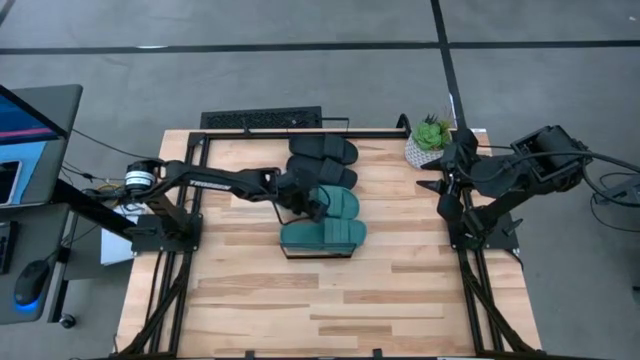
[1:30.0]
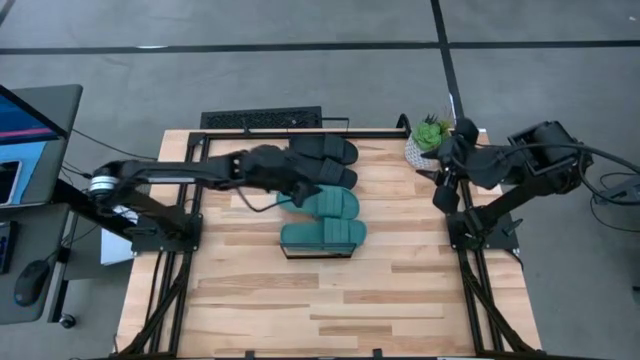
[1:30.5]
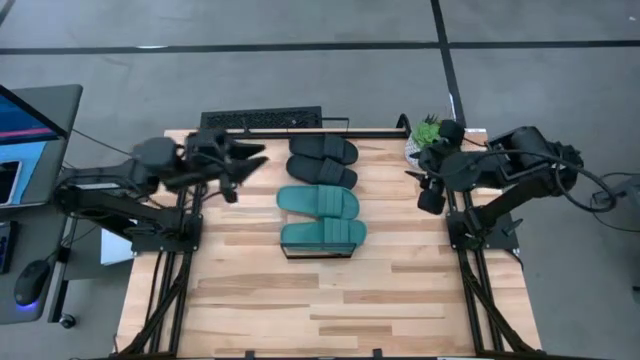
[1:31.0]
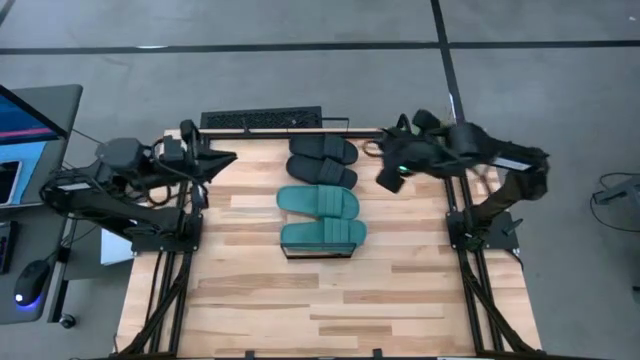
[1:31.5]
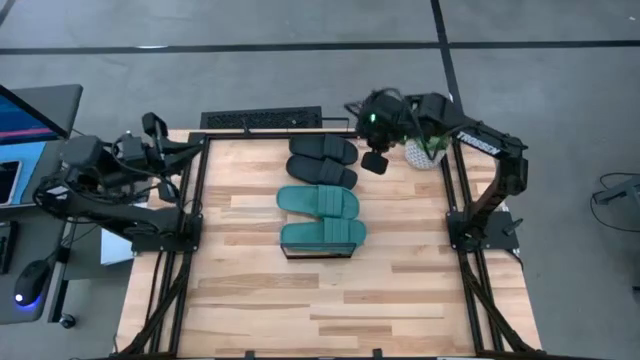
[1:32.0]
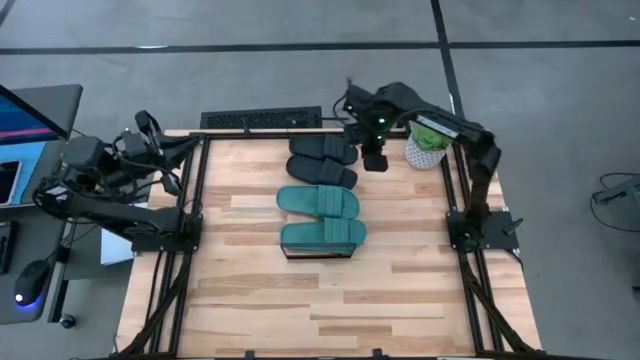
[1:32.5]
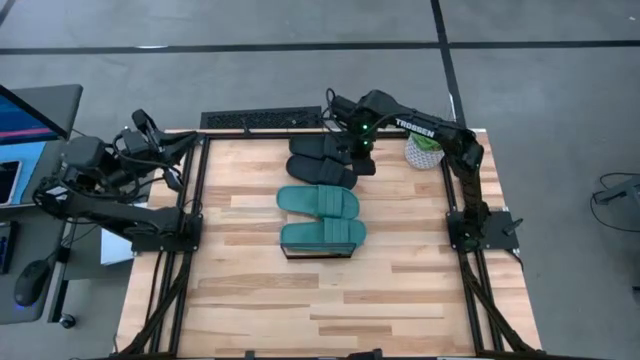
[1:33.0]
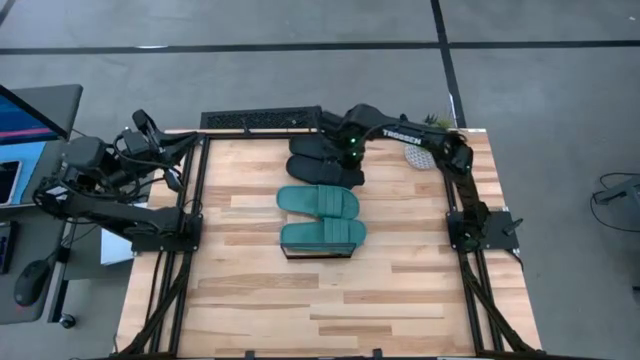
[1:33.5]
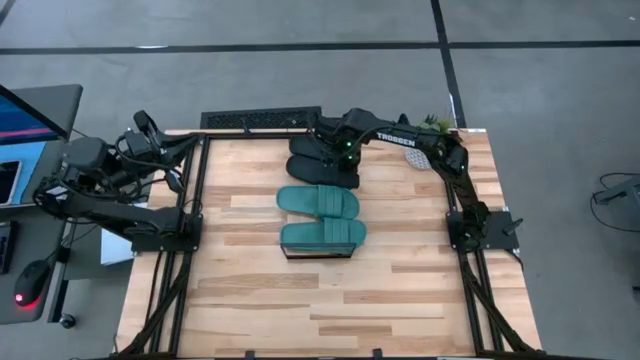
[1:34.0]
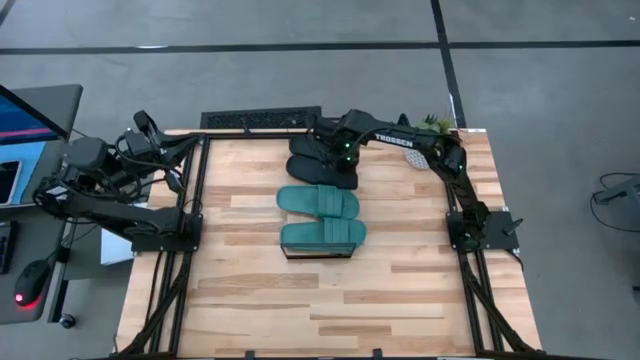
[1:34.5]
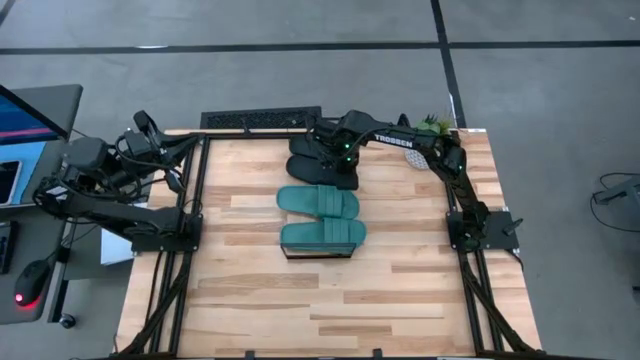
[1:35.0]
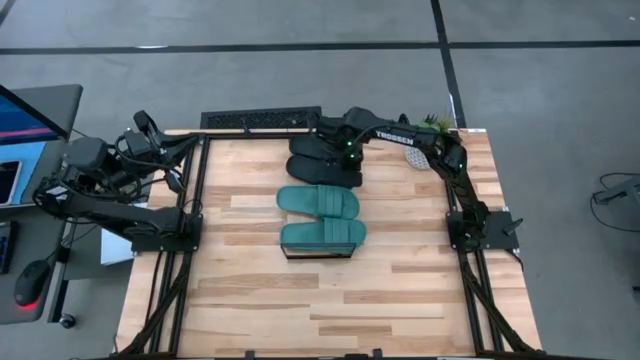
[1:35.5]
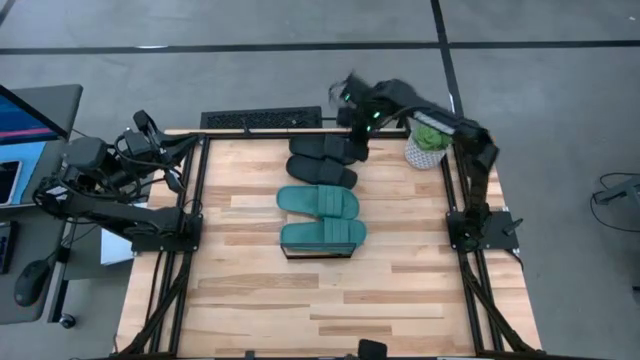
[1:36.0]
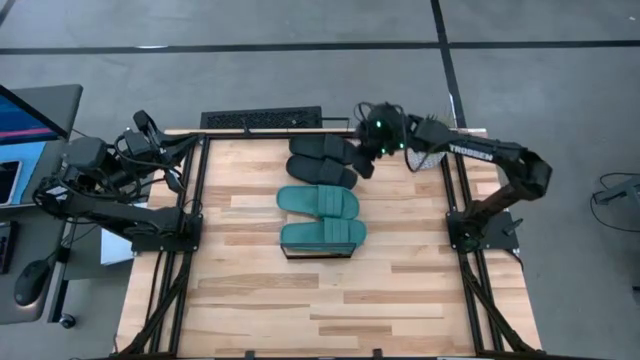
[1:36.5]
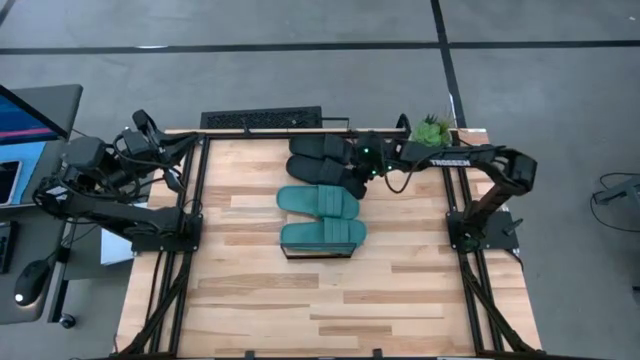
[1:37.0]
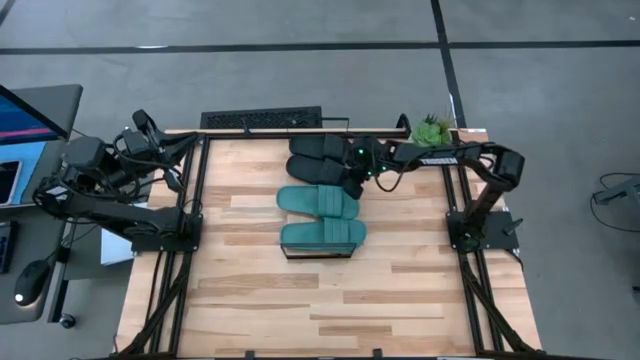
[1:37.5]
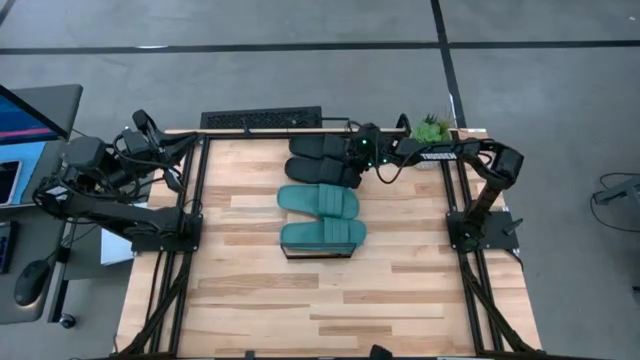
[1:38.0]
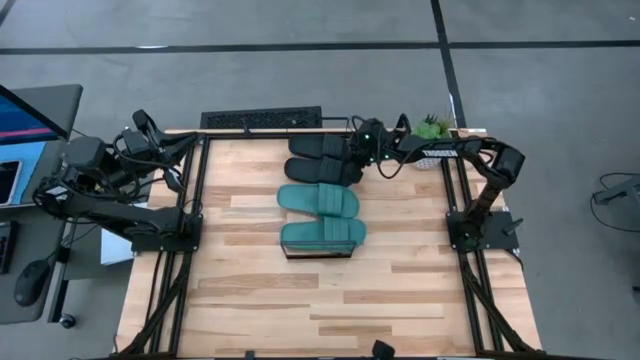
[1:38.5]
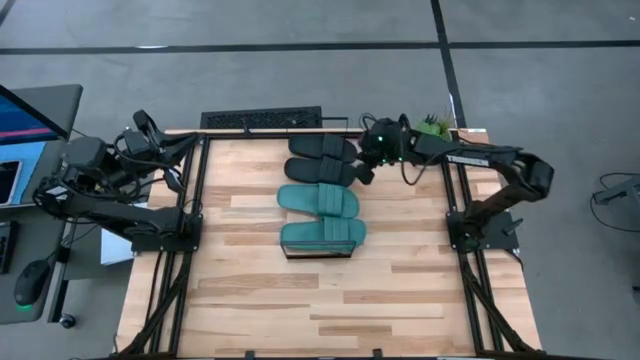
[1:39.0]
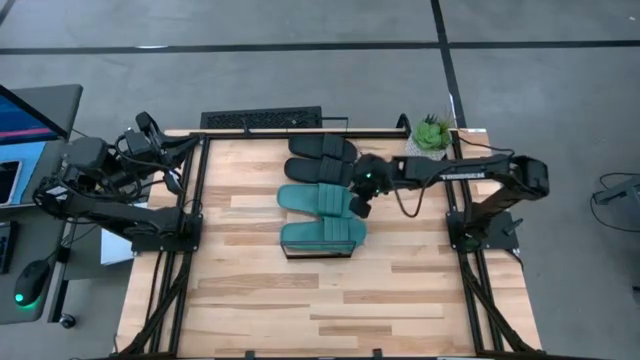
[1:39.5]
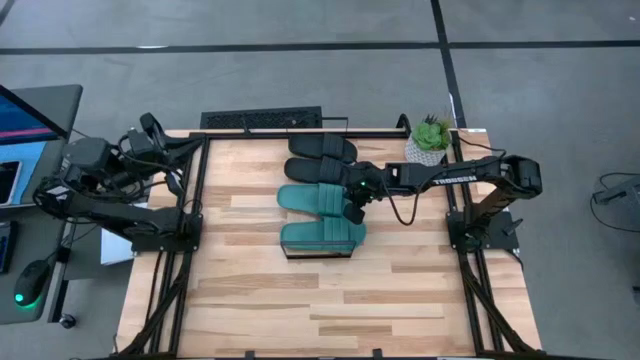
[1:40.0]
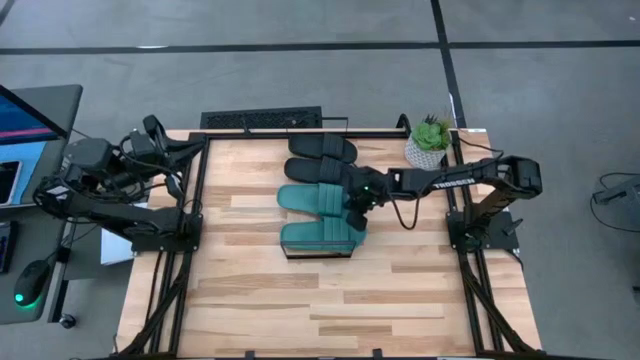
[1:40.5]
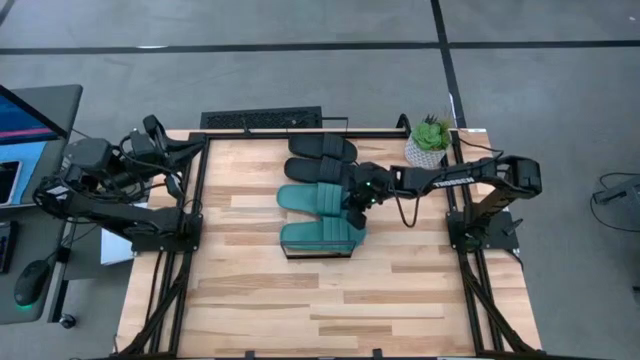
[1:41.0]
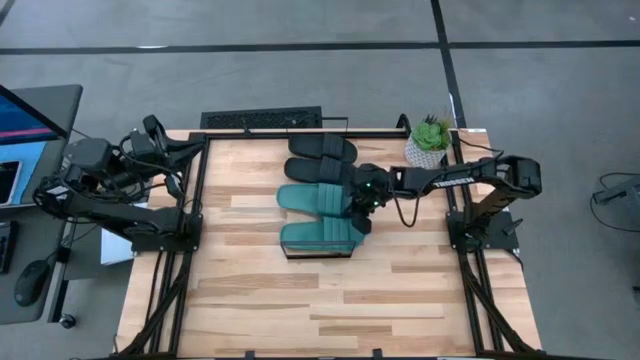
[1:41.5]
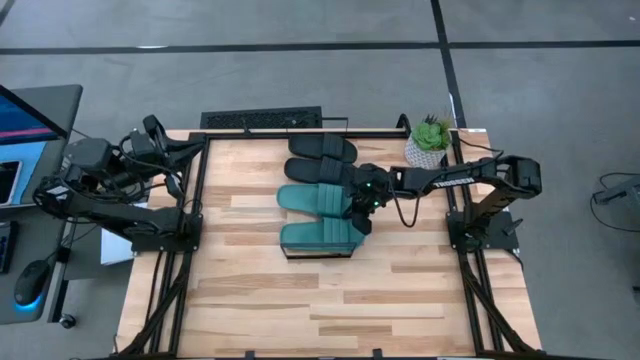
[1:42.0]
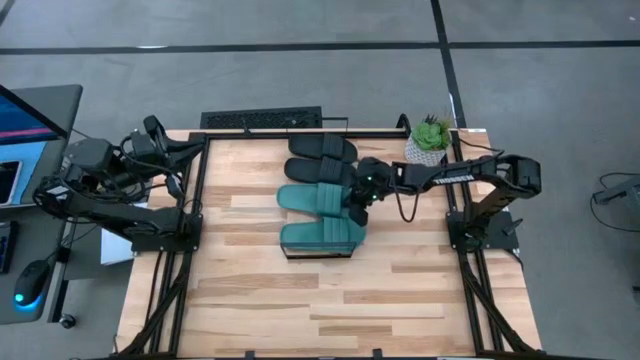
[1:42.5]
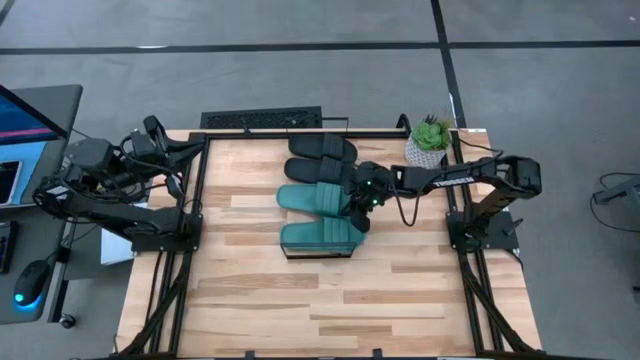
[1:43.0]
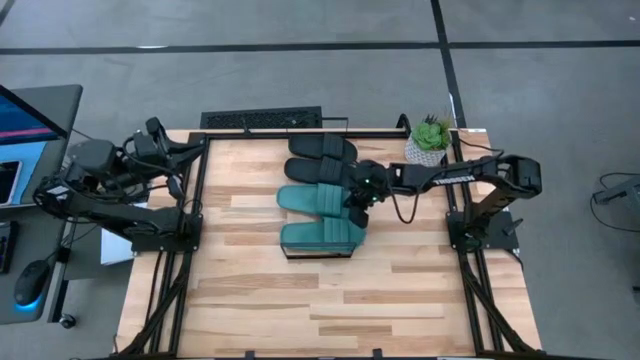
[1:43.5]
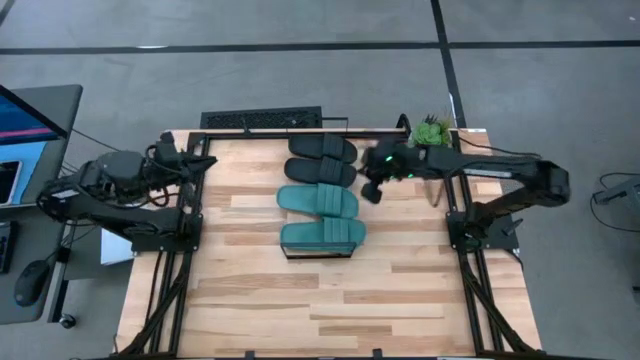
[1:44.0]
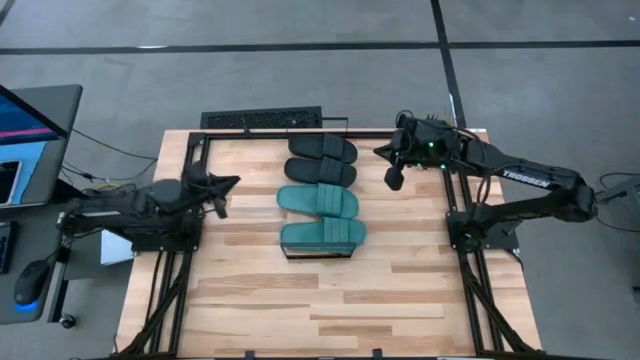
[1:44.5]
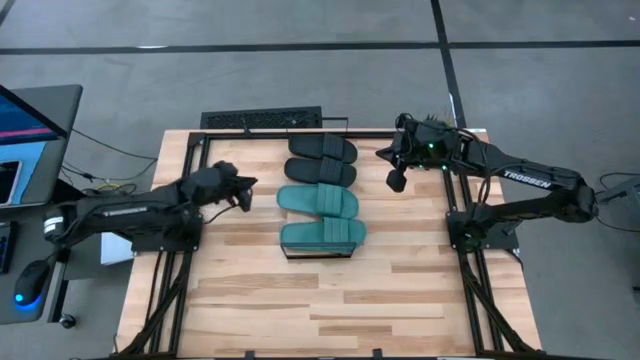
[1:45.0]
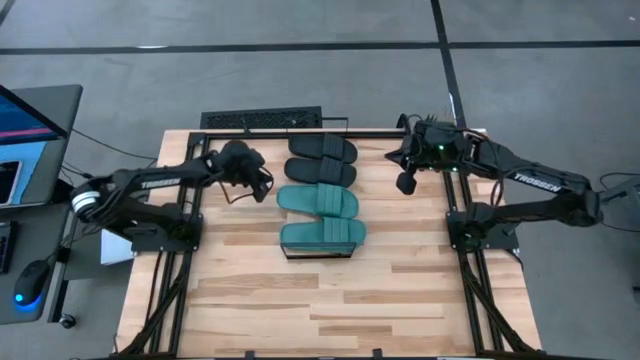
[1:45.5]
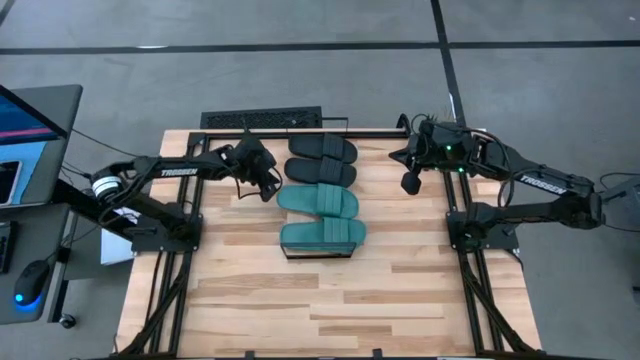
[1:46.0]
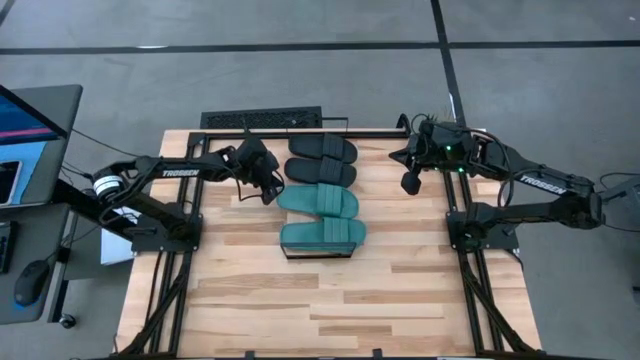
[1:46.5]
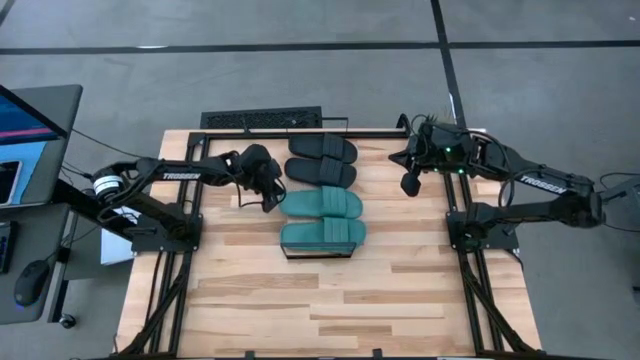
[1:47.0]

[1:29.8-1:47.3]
Task: Pick and place slides into the shelf
Adjust the green and black slides on the shelf

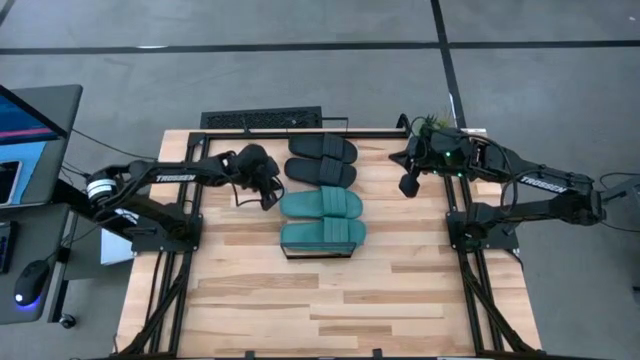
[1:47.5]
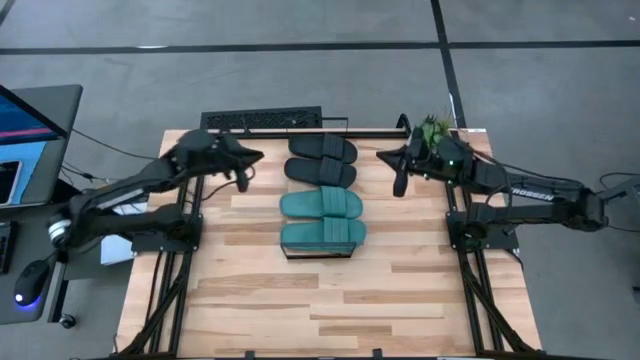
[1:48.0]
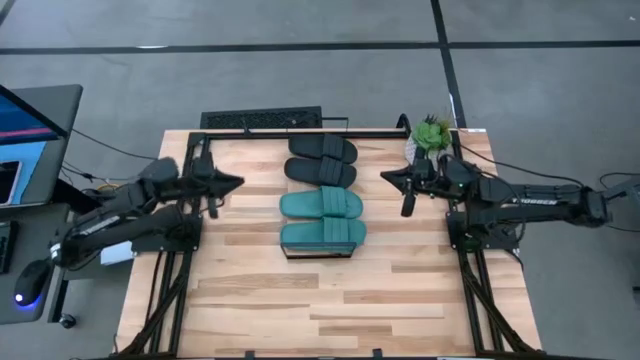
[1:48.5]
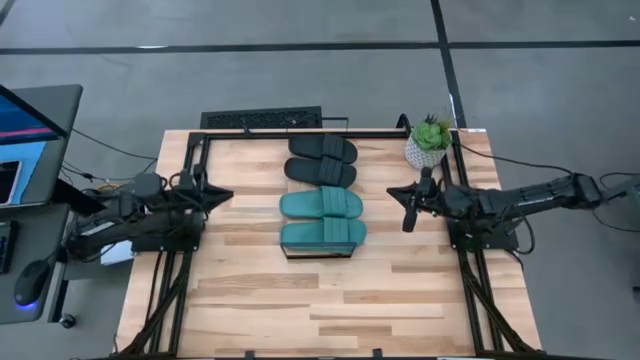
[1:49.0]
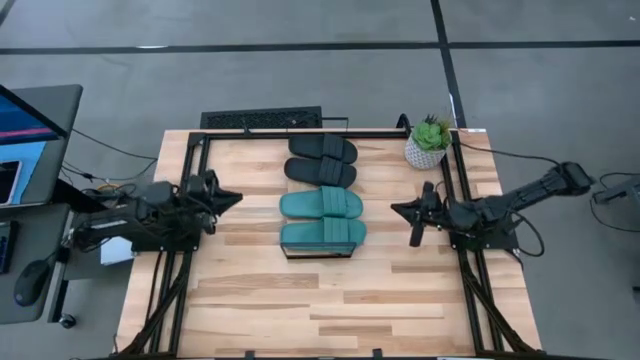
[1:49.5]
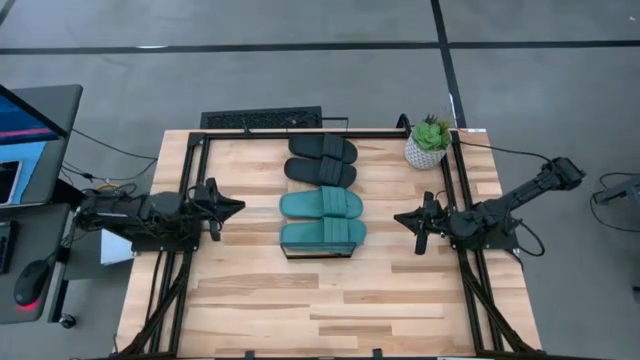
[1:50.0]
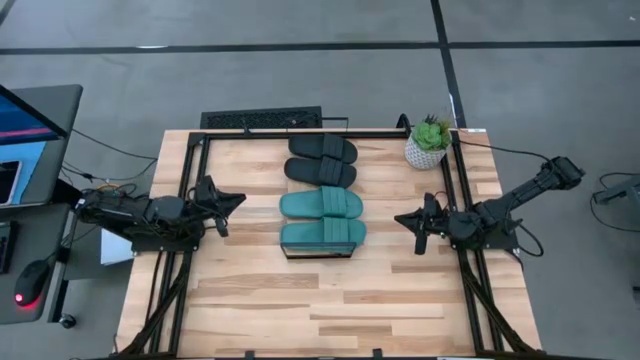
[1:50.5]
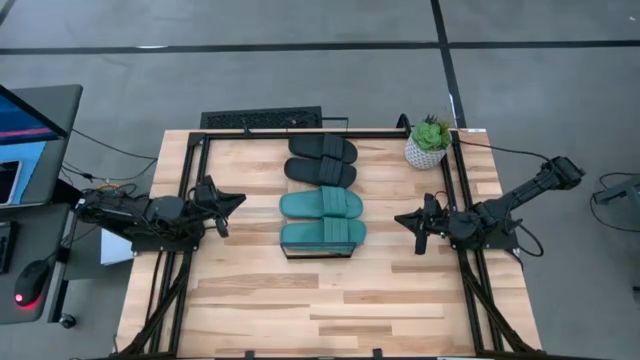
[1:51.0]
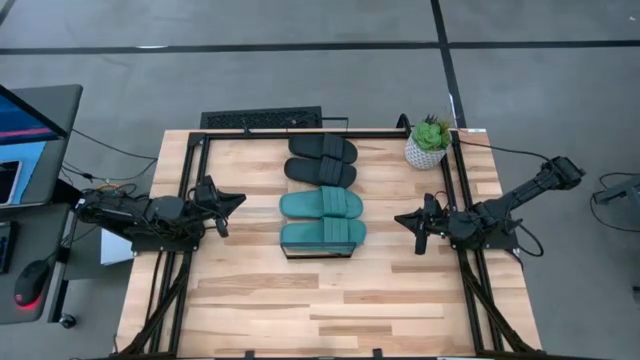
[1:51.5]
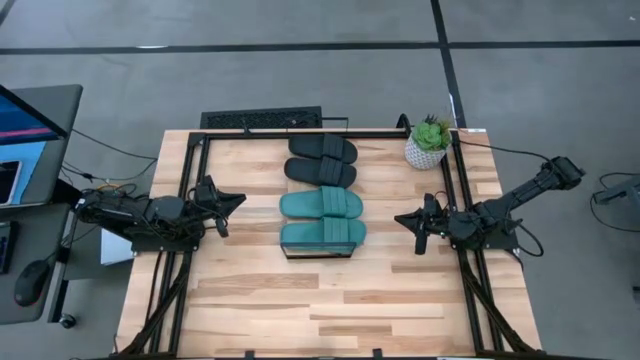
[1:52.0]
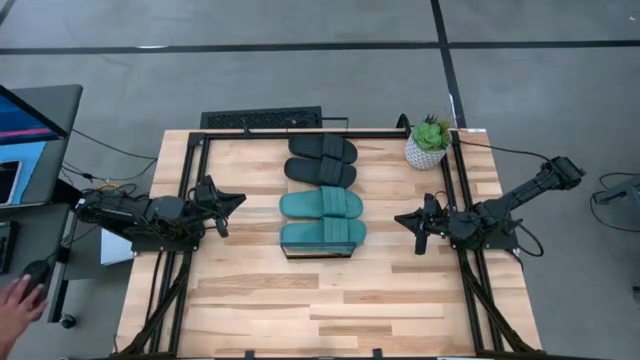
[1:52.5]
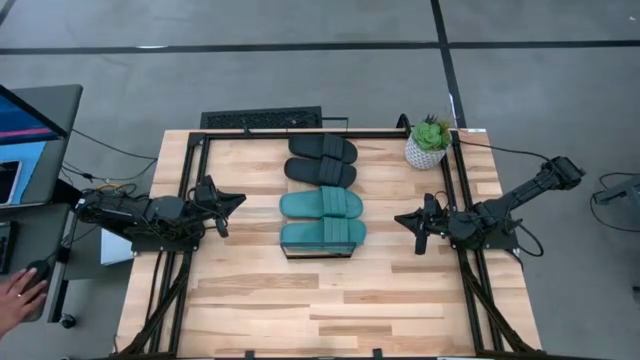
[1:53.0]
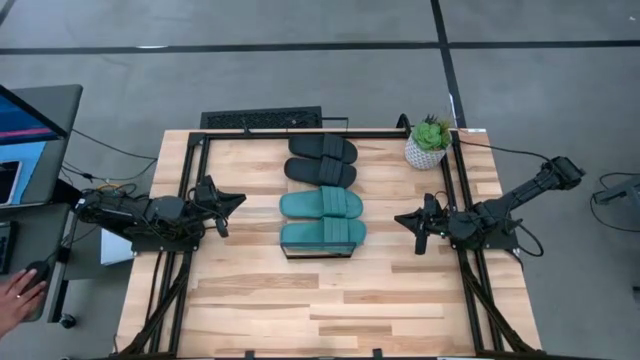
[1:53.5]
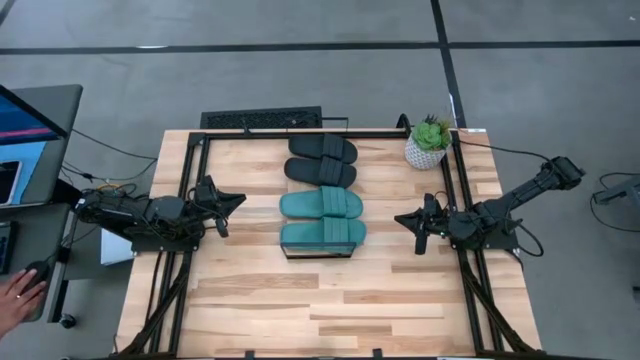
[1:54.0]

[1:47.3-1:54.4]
Return to Home Position
